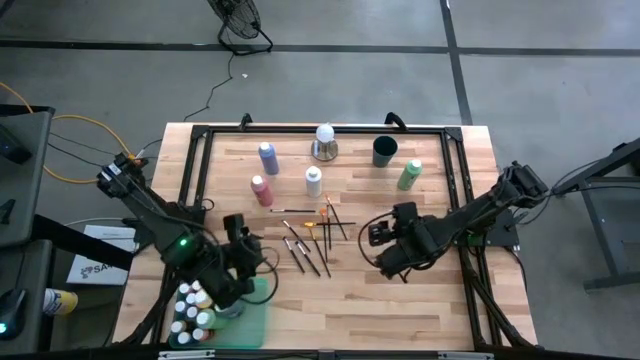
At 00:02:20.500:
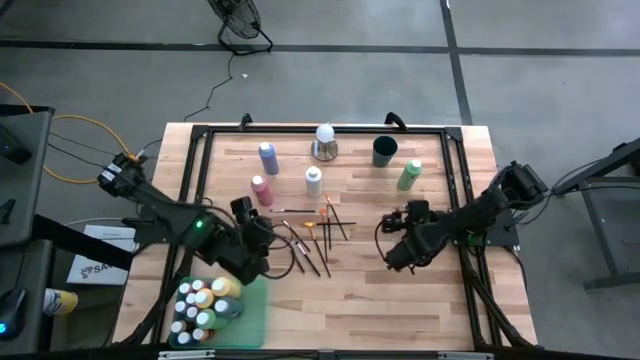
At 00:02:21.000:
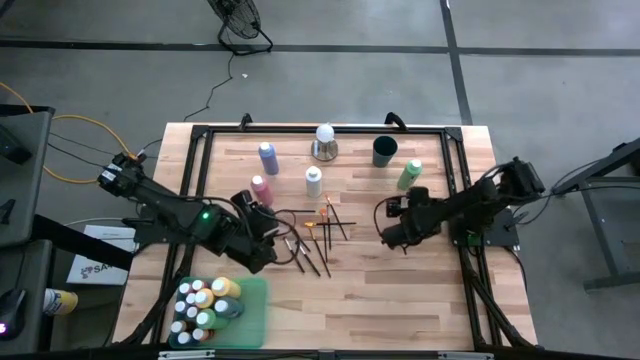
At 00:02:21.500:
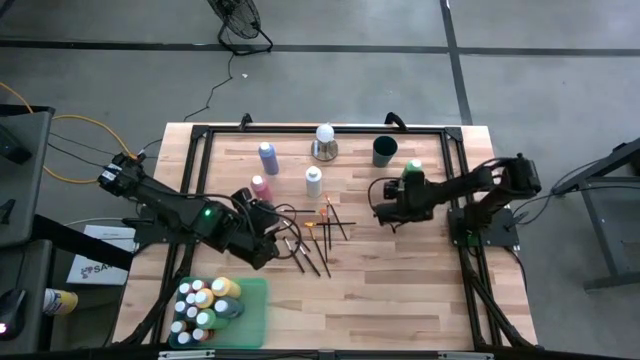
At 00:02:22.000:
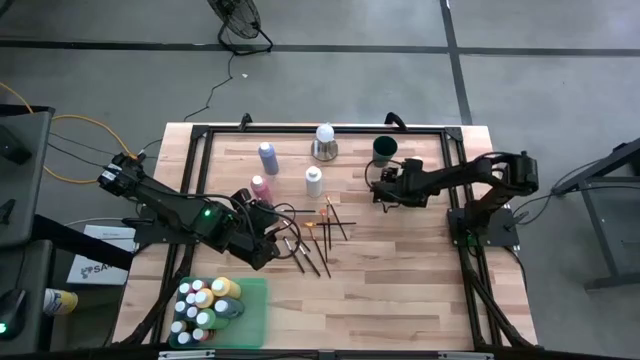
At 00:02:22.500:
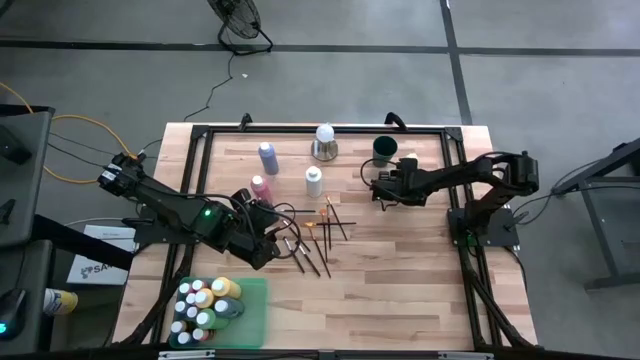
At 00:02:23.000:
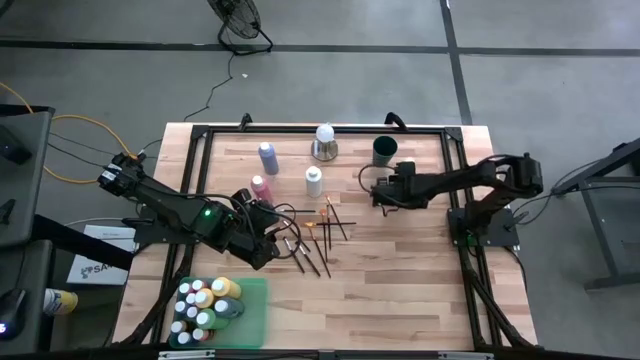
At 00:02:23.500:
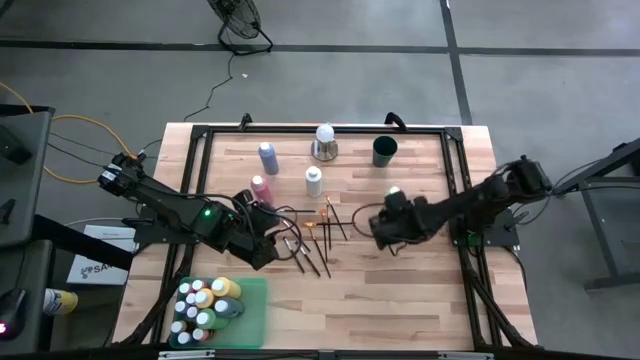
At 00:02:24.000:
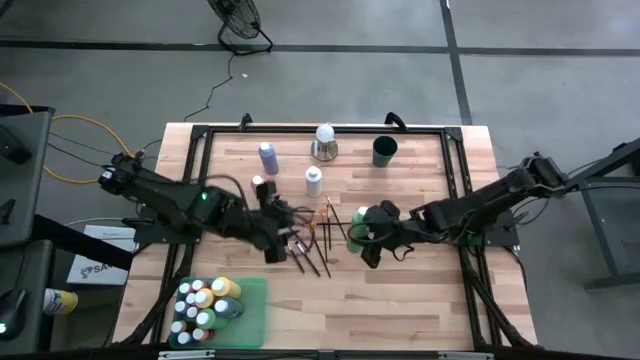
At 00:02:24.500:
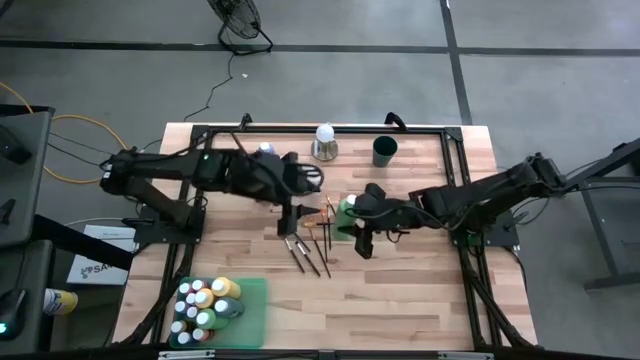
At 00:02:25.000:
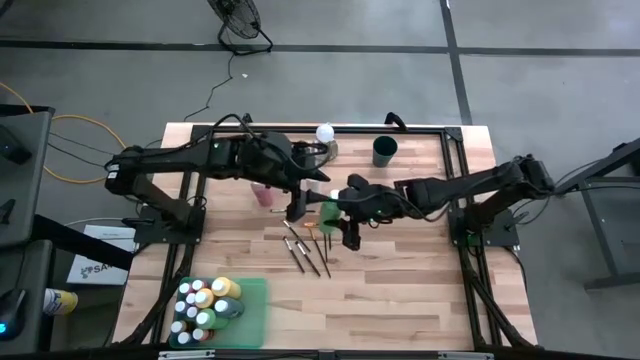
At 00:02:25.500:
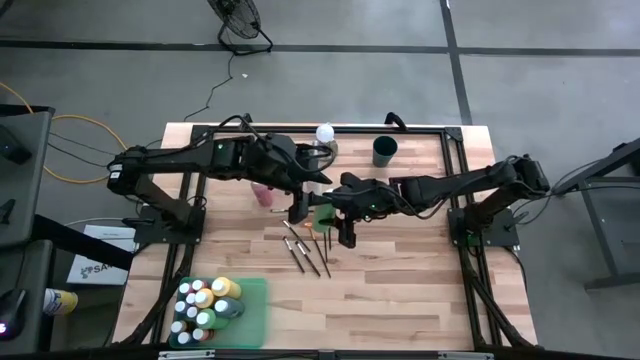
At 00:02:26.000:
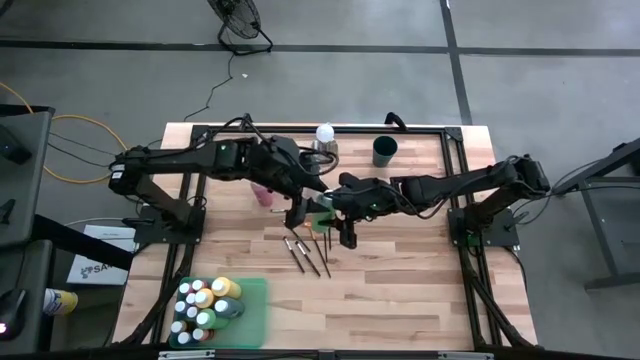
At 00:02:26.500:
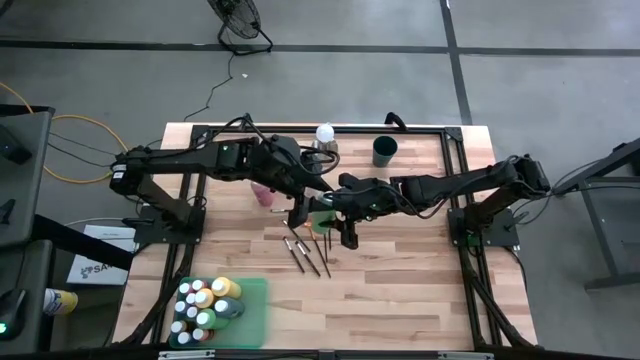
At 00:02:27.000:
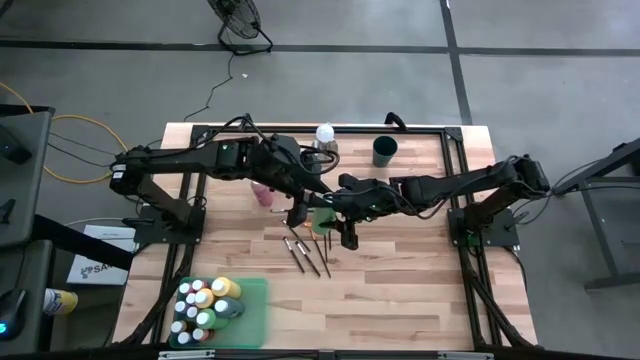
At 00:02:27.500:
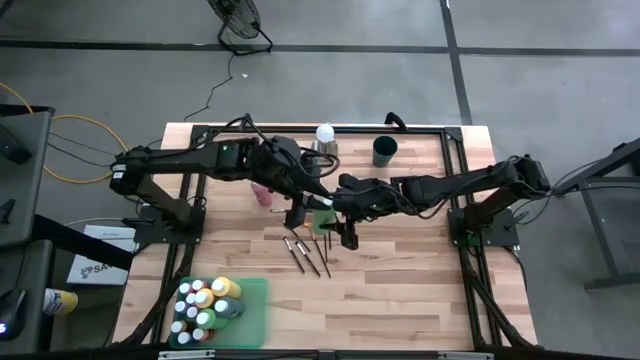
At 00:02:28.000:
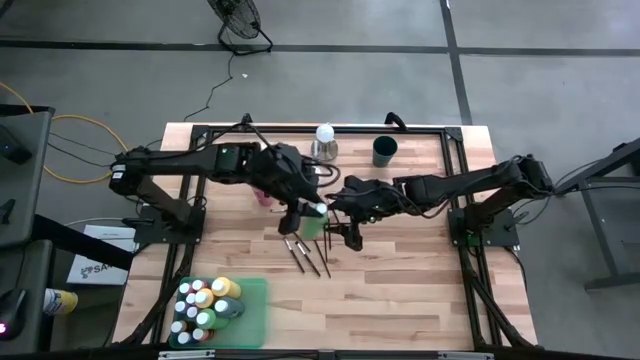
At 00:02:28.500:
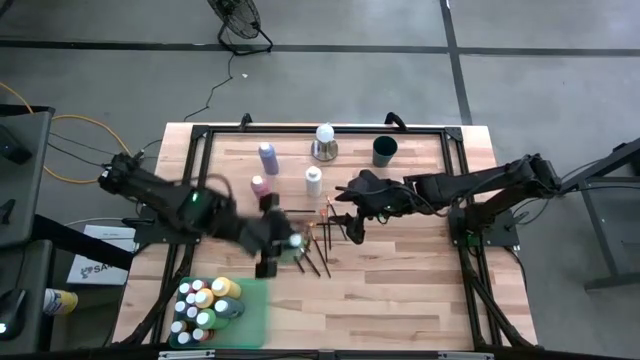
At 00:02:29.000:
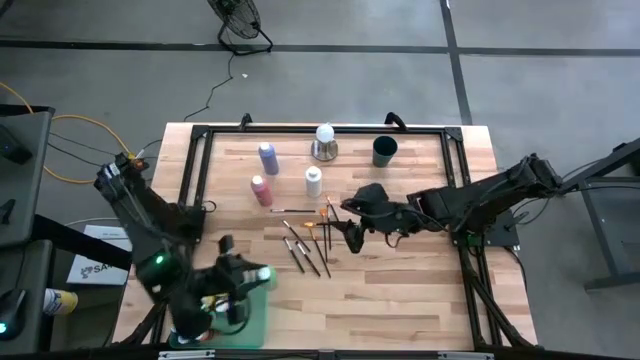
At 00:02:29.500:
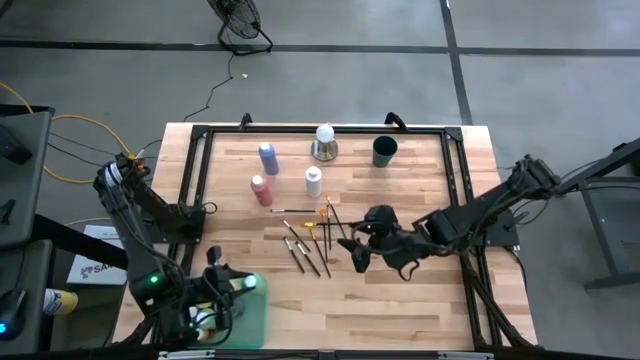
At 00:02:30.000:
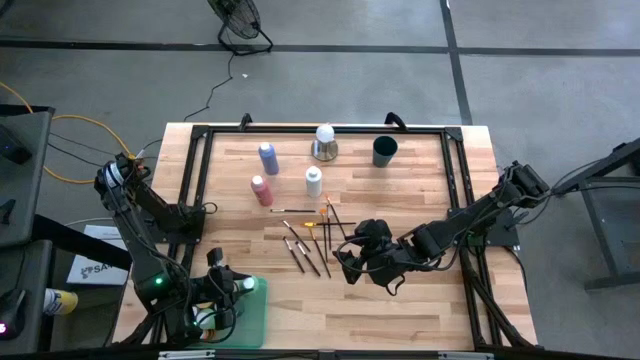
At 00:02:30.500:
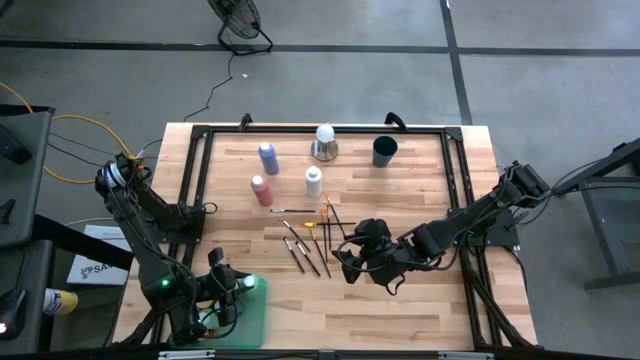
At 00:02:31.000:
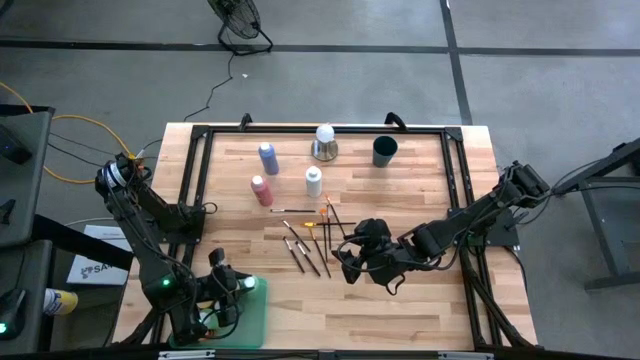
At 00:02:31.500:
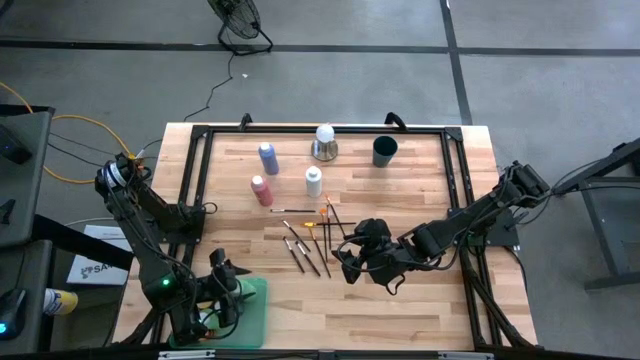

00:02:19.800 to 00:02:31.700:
Task: Pick & Place Paint Supplies
Put the green paint bottle into the green bin

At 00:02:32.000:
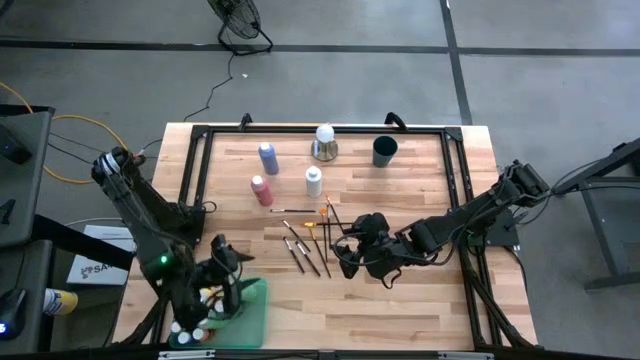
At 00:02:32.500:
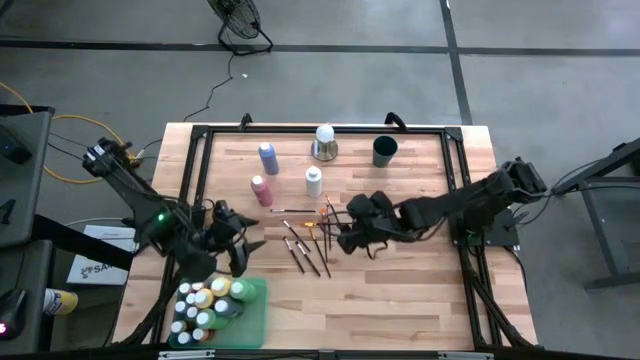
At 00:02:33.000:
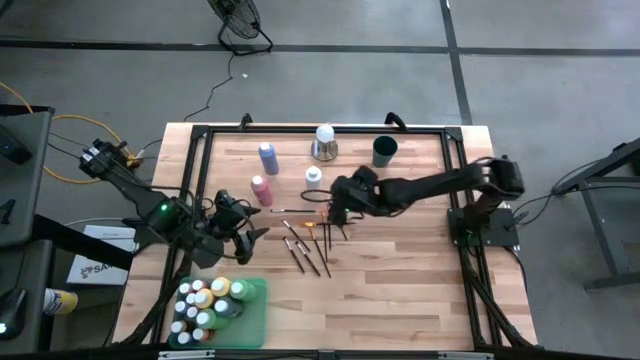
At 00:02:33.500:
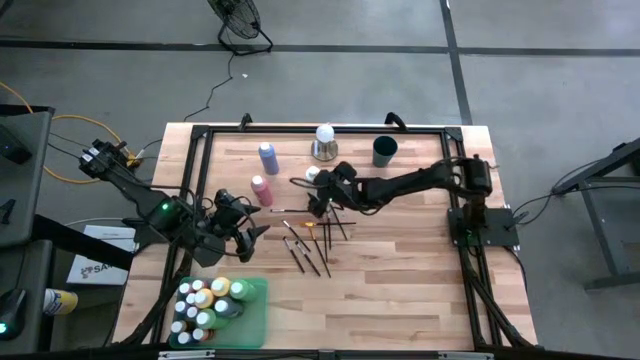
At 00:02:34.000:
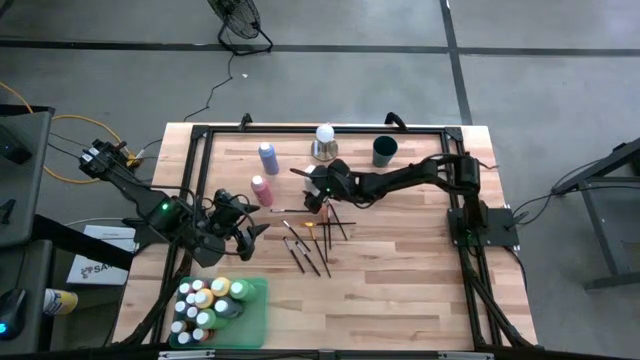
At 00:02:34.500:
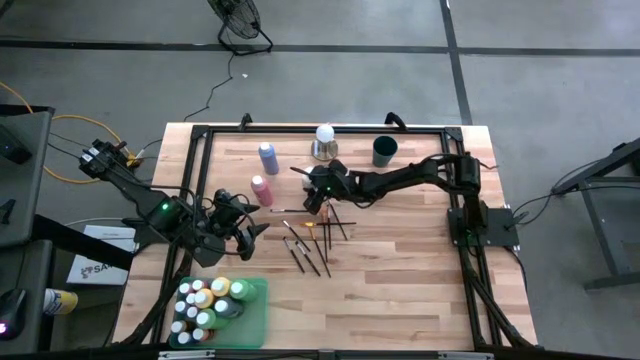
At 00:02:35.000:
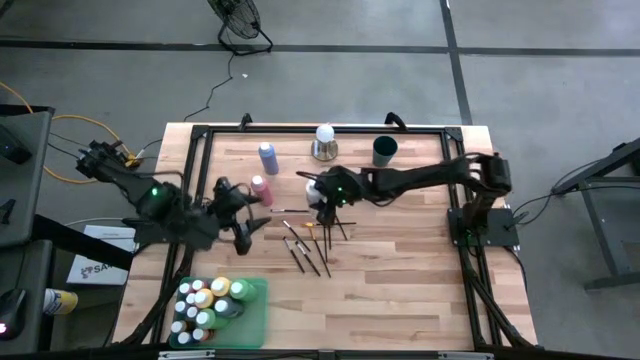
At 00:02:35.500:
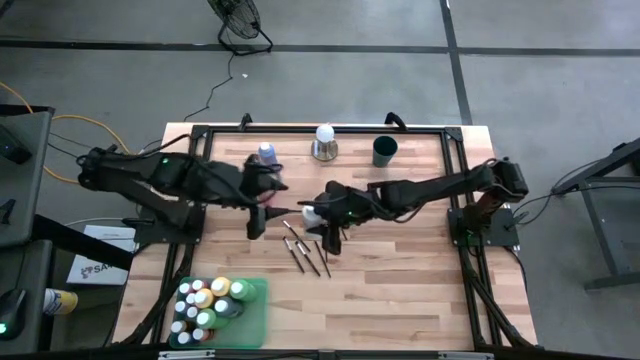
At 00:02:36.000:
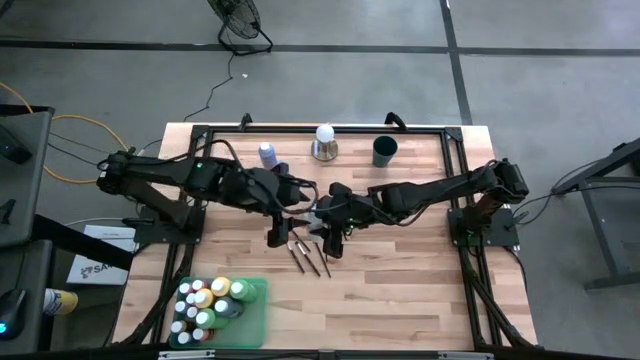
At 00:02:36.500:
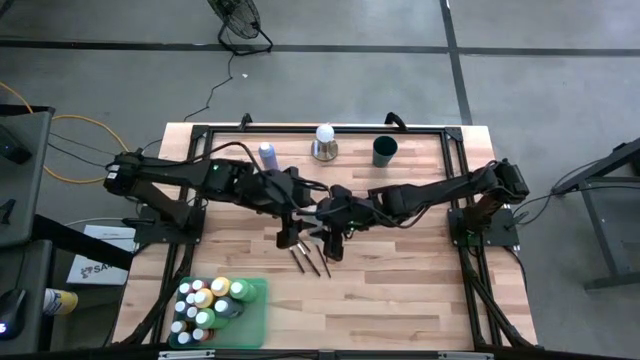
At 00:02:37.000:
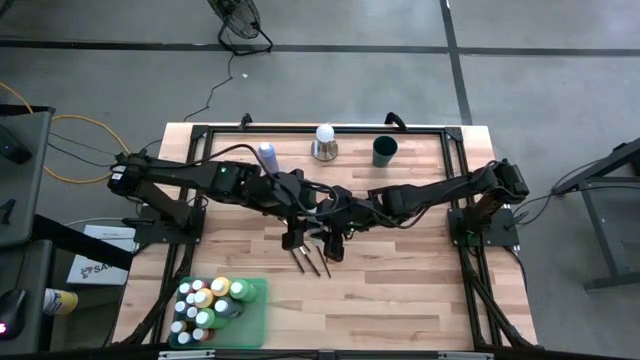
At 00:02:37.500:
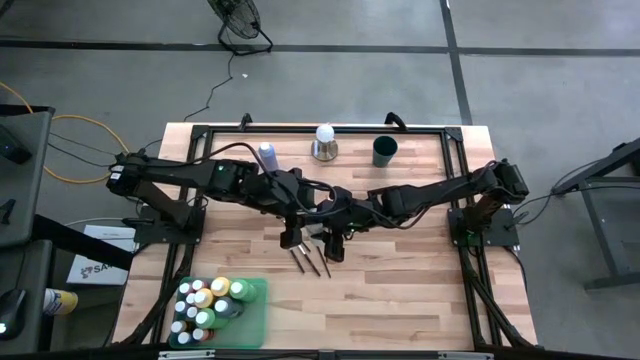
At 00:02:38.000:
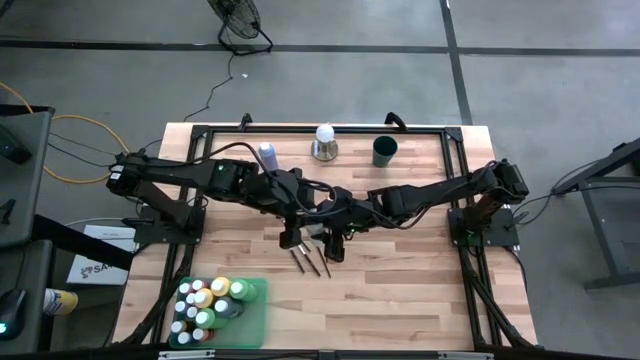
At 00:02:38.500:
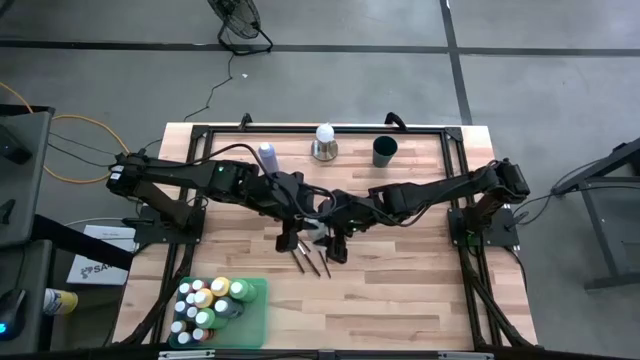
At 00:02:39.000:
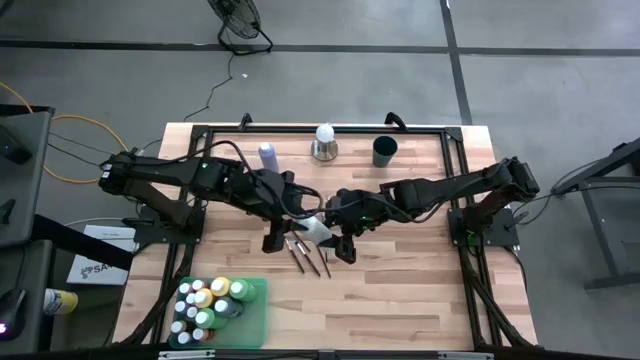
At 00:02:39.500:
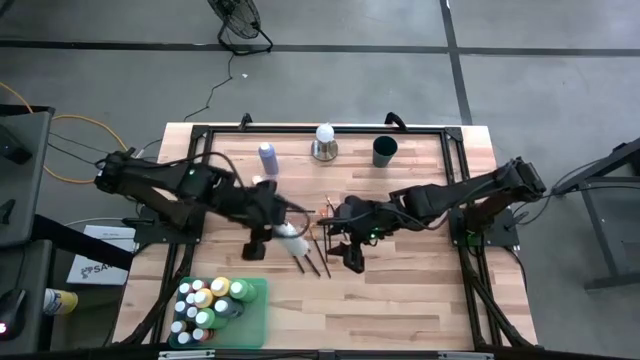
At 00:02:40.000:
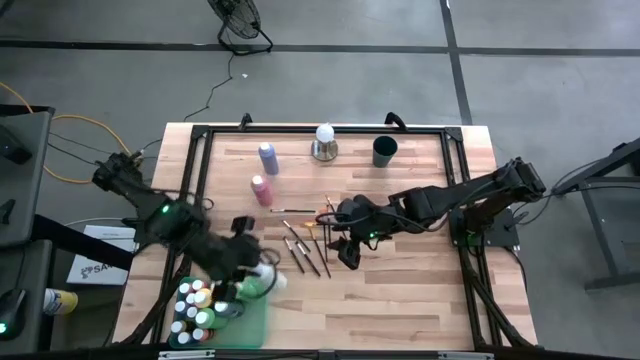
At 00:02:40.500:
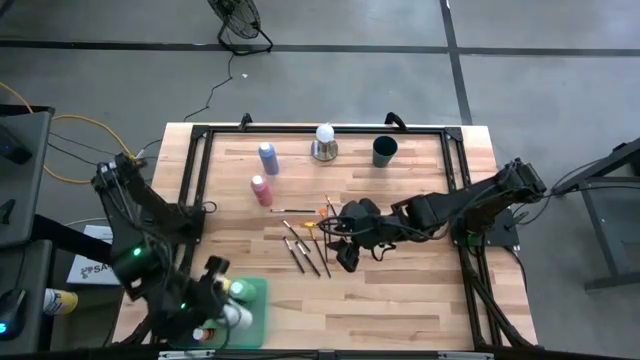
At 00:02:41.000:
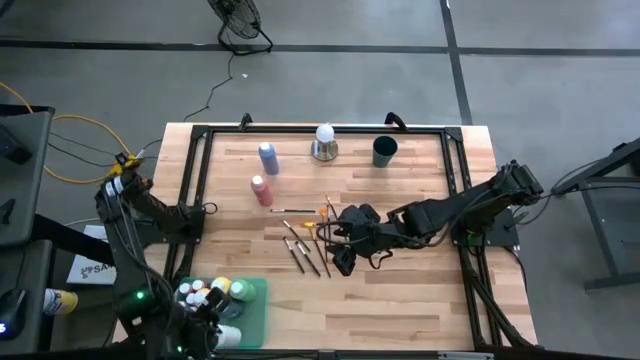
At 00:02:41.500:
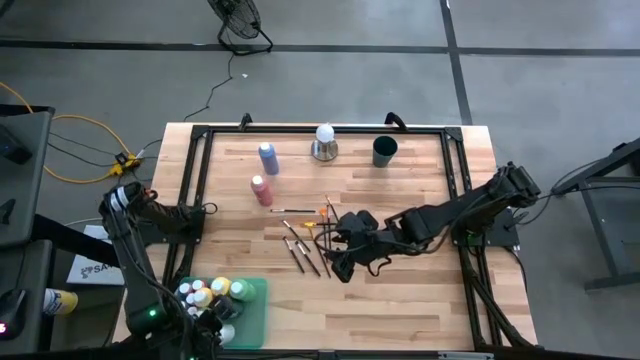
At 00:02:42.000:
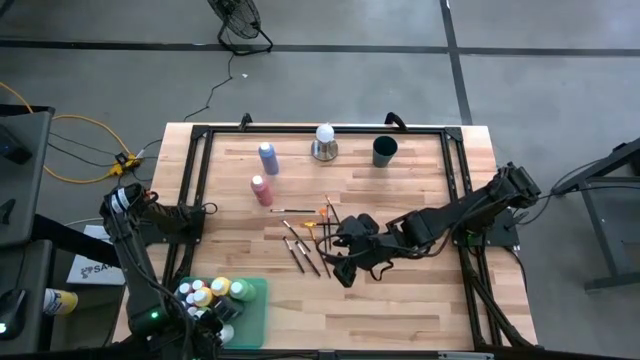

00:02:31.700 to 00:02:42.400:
Put the white paint bottle into the green bin
